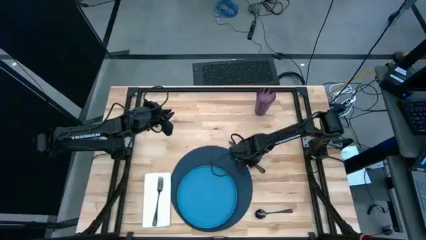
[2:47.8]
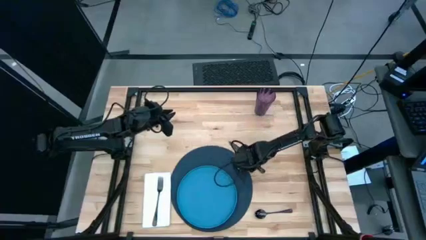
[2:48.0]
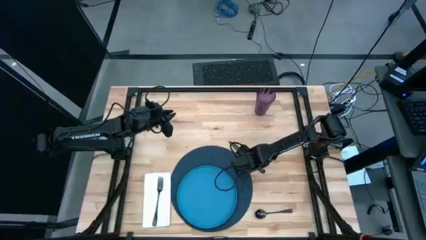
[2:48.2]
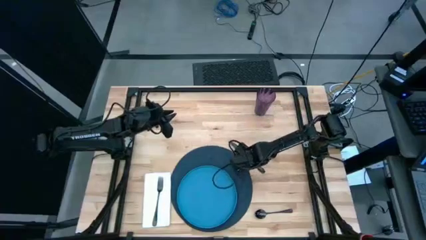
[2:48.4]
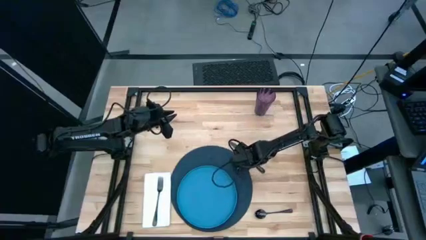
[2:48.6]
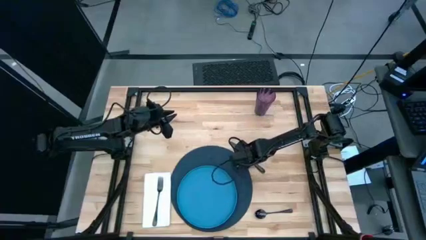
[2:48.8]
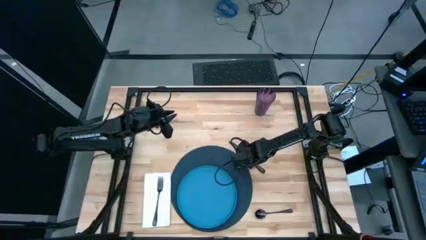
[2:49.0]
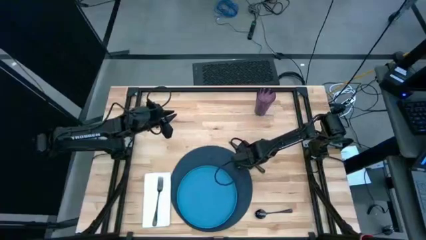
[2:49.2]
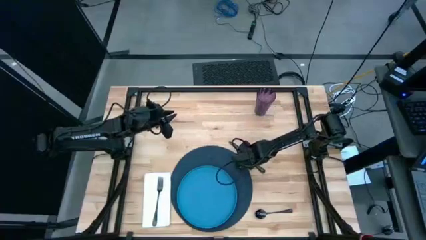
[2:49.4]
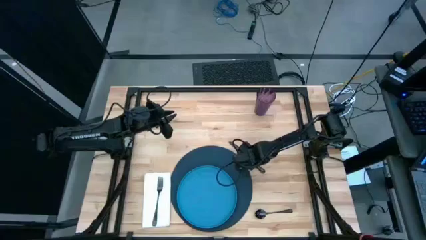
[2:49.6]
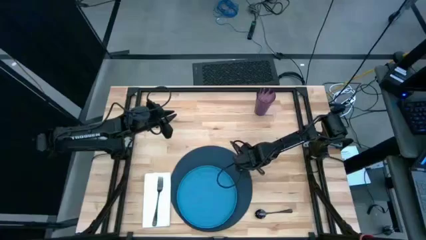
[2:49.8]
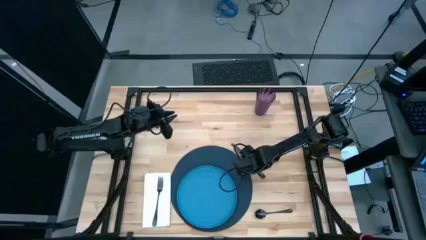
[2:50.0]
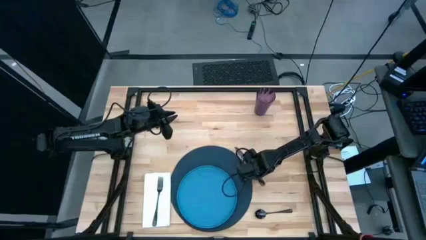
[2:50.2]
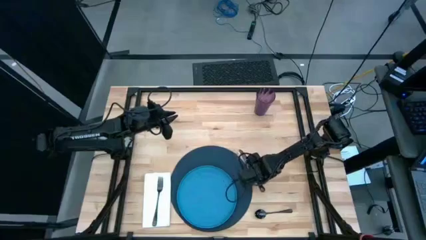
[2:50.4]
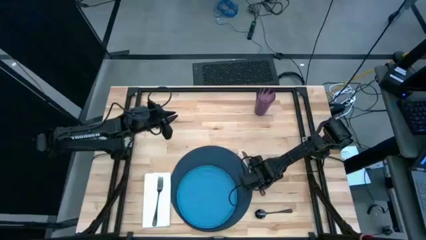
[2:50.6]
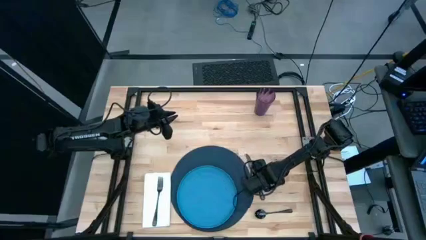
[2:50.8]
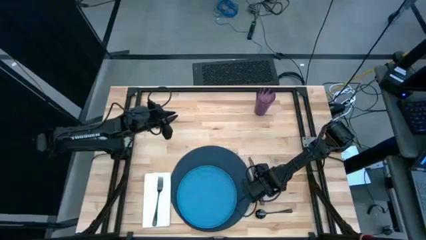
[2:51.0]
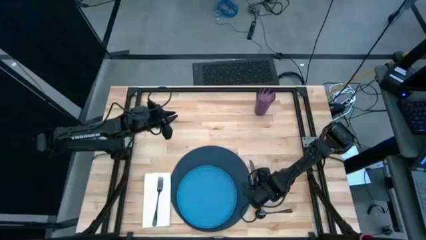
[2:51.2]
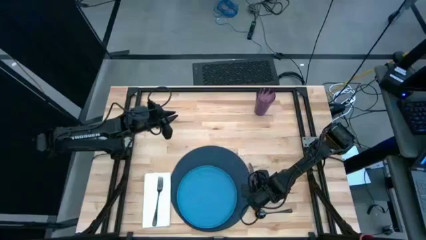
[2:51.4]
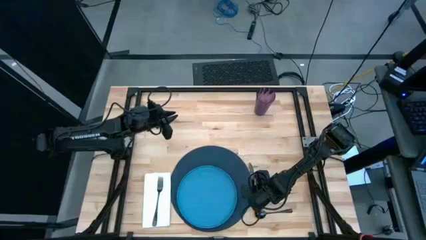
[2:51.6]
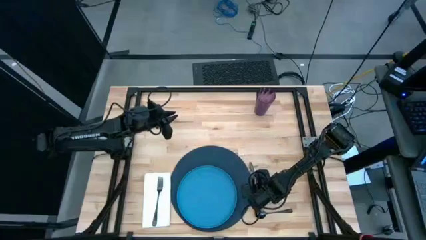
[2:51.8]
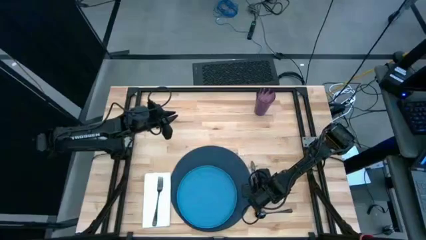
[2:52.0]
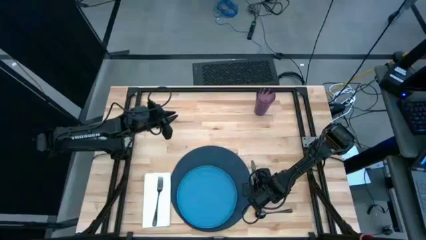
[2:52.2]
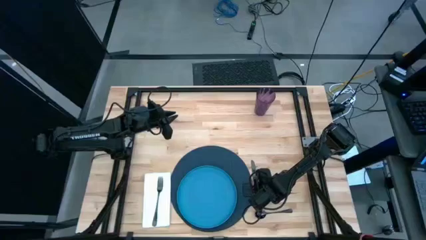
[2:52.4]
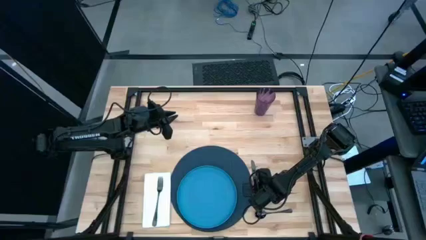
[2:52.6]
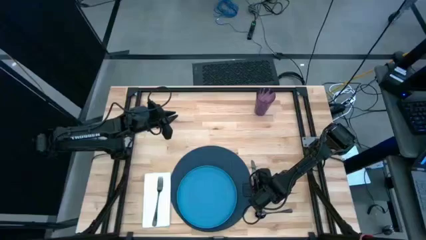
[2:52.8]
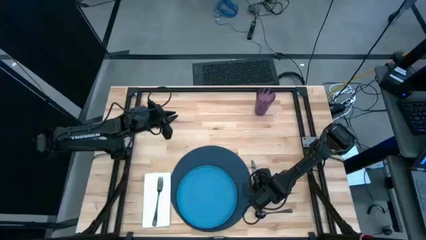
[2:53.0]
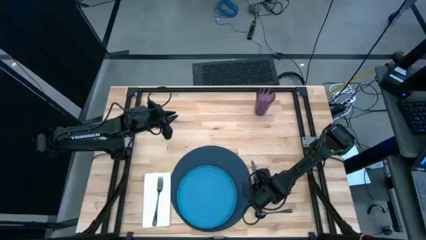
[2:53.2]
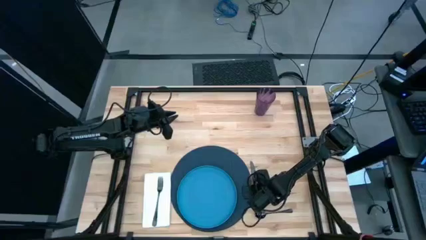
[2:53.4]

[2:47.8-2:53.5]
Task: Set table place
Put the black knife to the right of the dark blue placemat

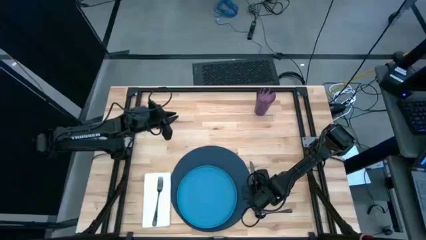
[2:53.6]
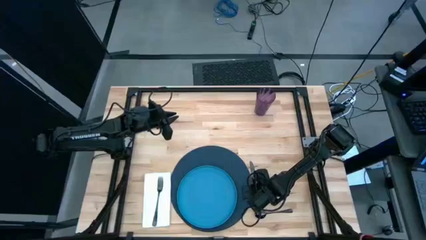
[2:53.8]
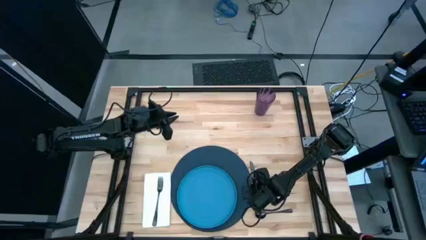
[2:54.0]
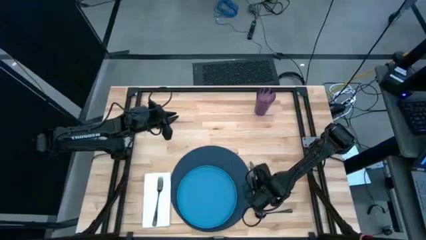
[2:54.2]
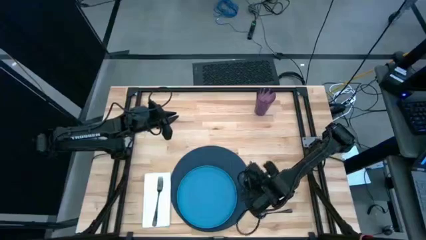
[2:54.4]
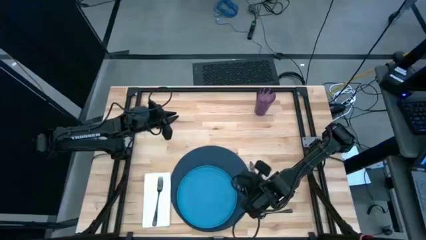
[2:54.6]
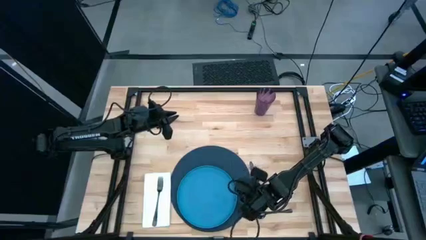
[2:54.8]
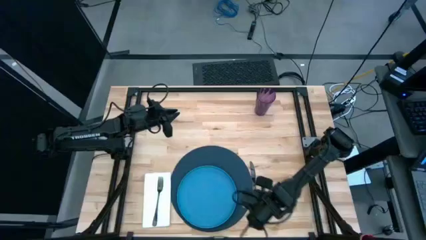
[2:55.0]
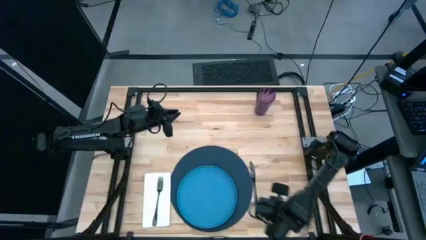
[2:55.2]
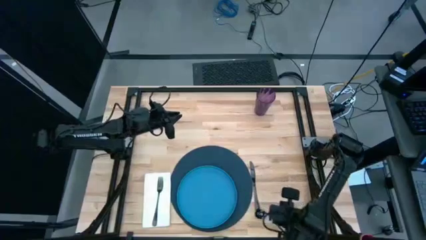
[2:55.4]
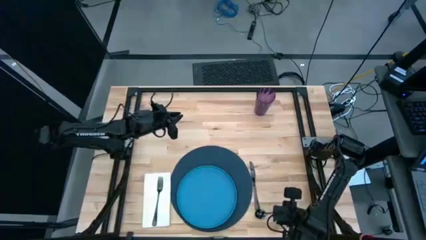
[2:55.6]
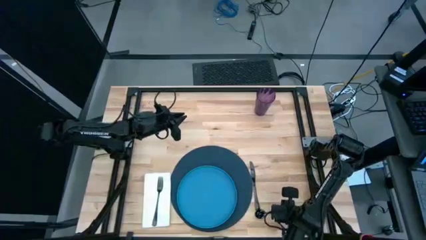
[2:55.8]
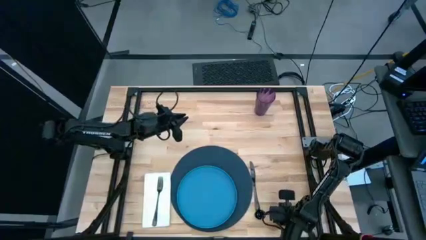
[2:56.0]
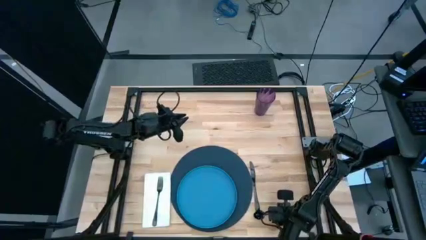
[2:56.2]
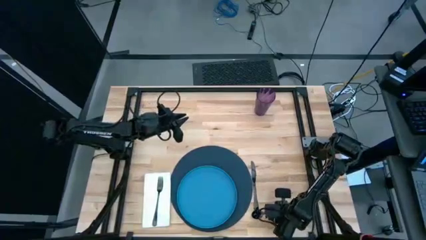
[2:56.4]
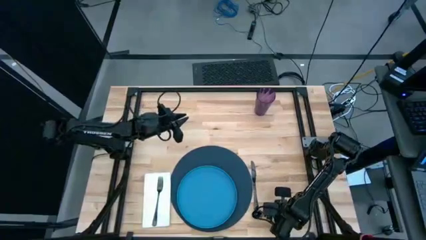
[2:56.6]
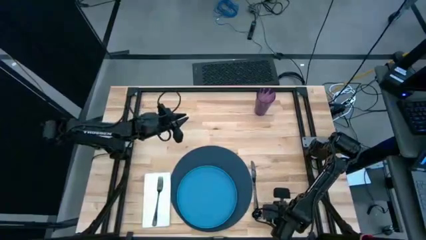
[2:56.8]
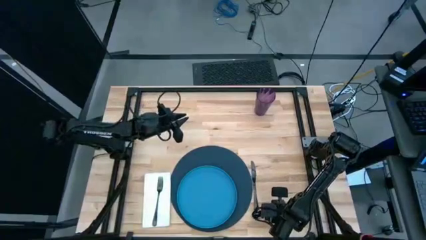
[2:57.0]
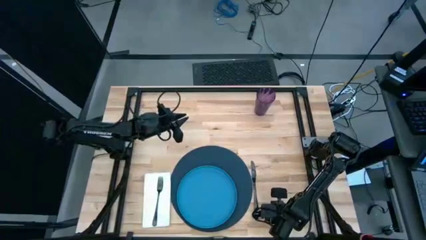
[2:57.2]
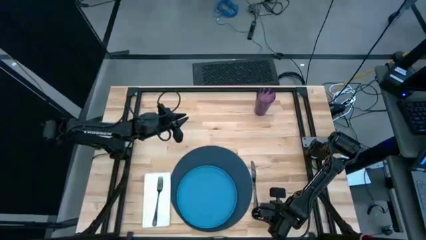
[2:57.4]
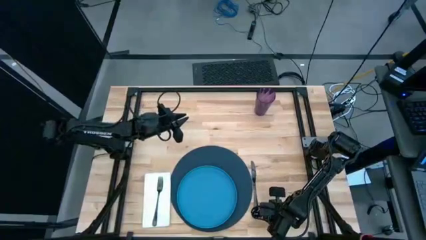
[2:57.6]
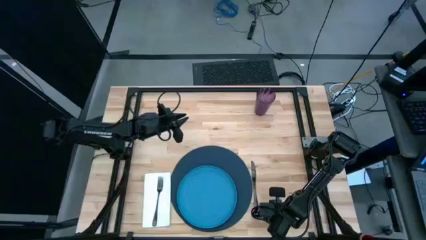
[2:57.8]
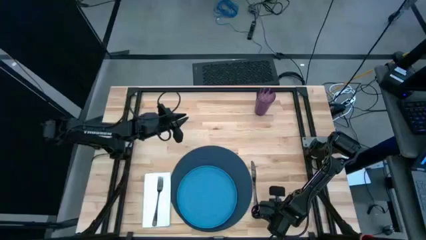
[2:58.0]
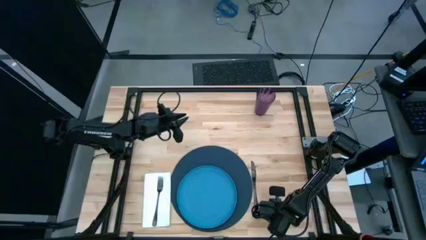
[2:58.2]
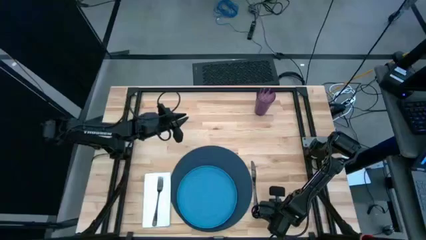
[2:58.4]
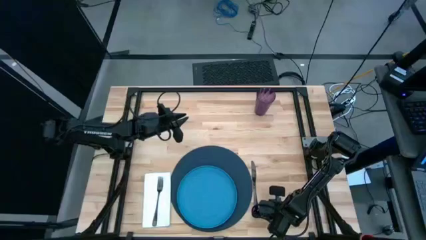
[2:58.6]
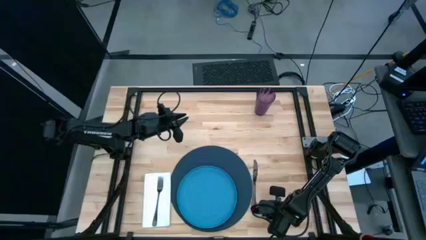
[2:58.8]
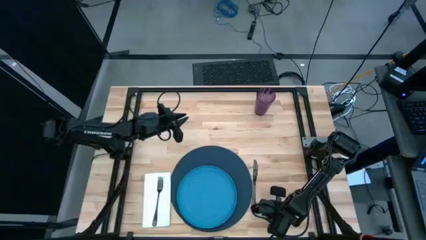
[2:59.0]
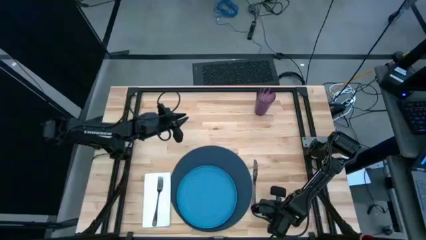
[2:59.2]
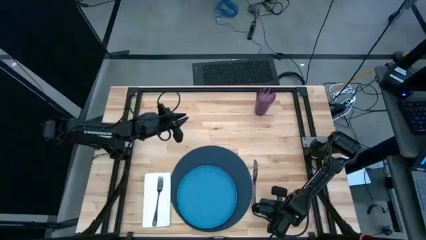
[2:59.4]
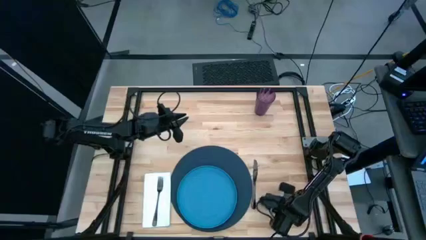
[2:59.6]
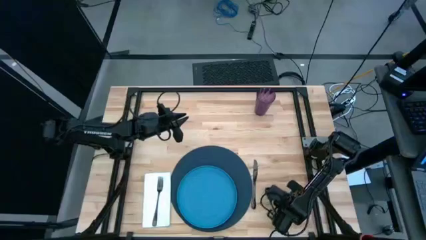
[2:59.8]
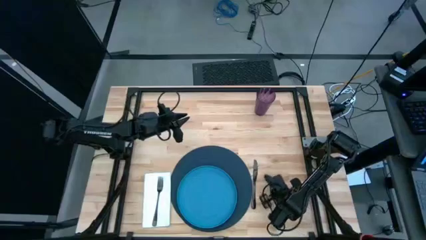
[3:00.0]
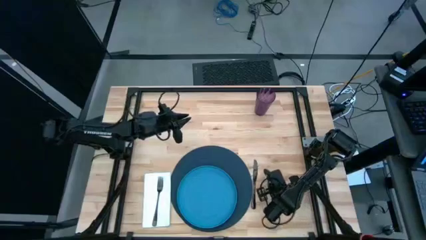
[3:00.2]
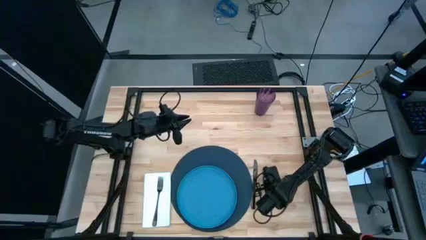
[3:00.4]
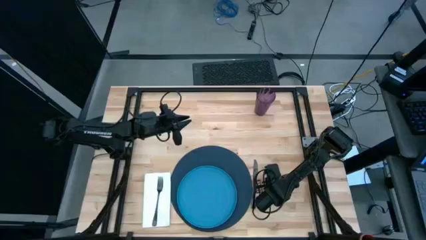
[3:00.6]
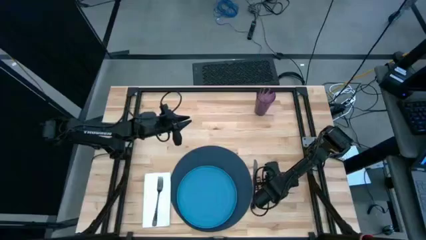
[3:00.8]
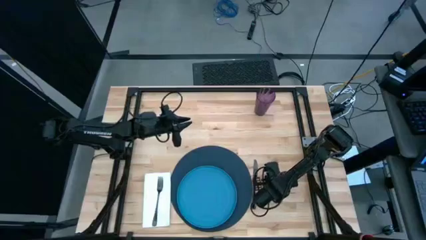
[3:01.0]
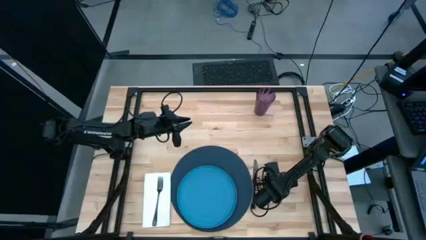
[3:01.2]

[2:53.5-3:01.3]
Put the black spoon to the right of the black knife
